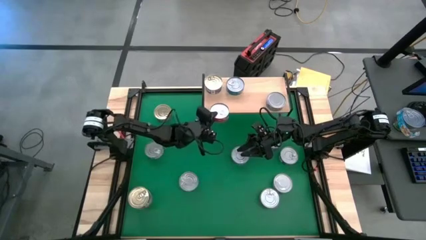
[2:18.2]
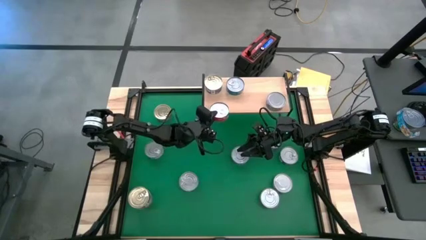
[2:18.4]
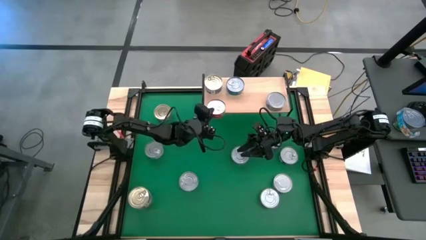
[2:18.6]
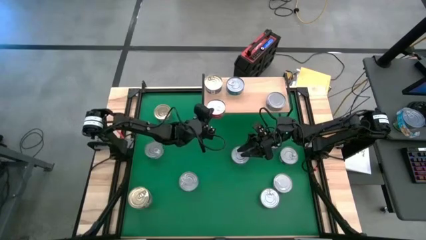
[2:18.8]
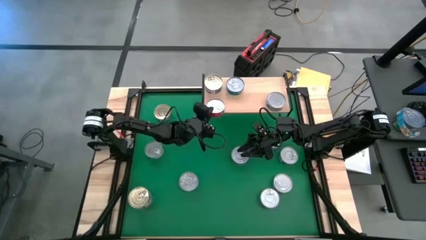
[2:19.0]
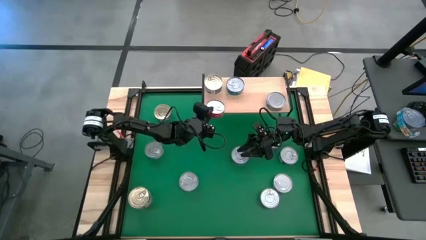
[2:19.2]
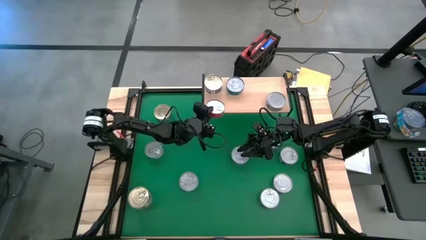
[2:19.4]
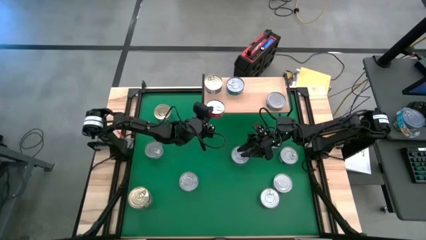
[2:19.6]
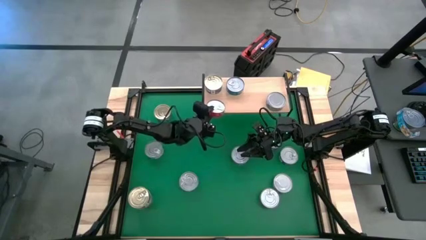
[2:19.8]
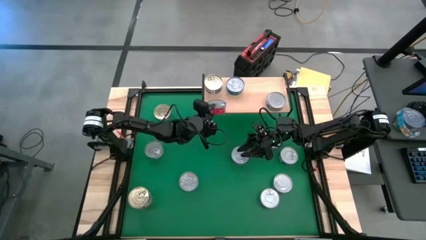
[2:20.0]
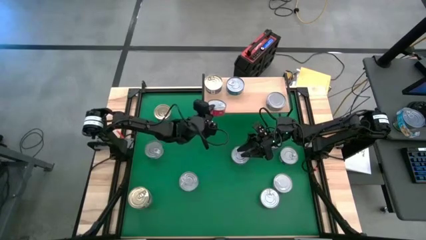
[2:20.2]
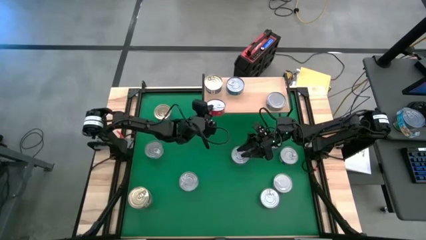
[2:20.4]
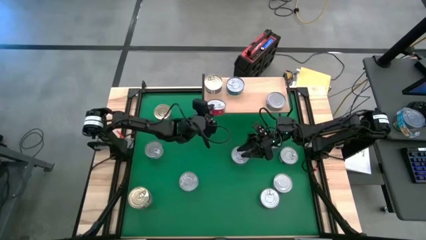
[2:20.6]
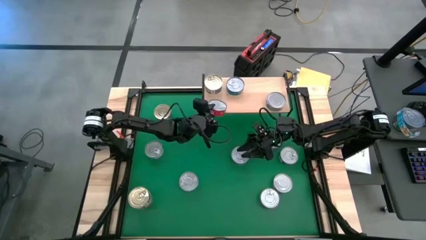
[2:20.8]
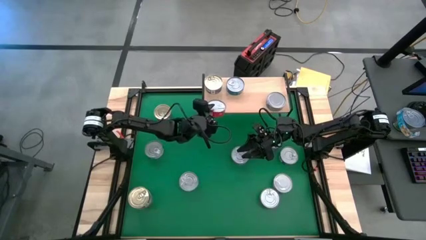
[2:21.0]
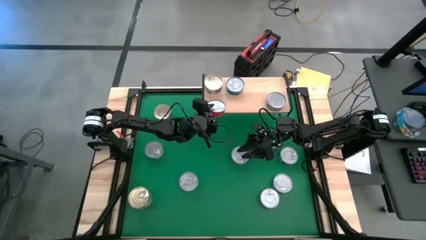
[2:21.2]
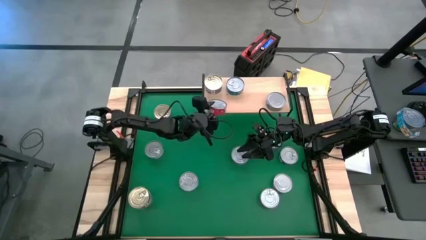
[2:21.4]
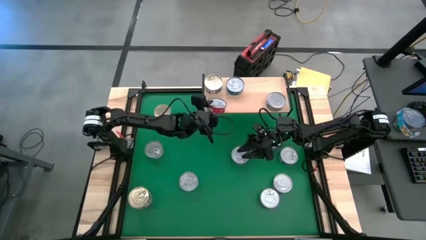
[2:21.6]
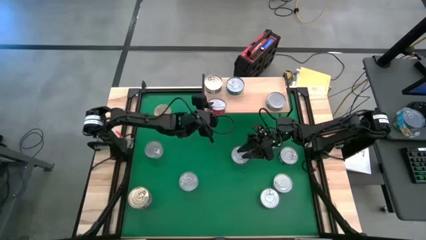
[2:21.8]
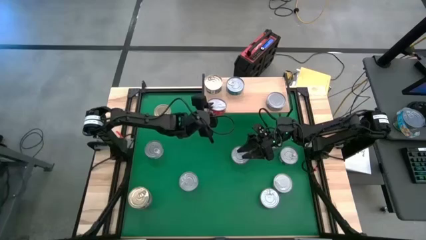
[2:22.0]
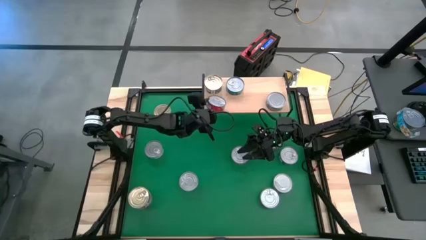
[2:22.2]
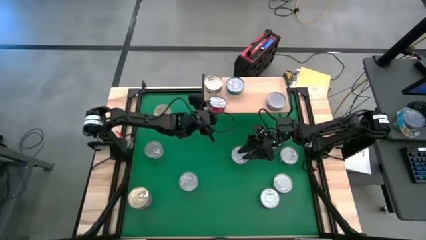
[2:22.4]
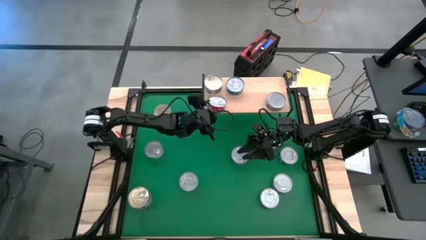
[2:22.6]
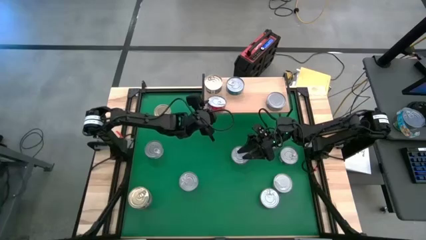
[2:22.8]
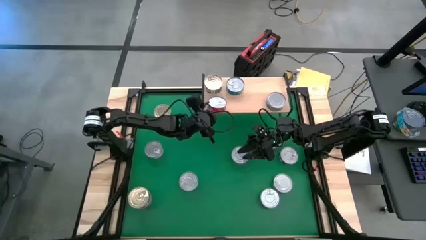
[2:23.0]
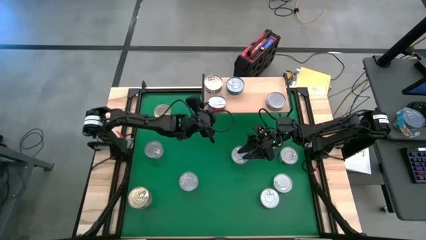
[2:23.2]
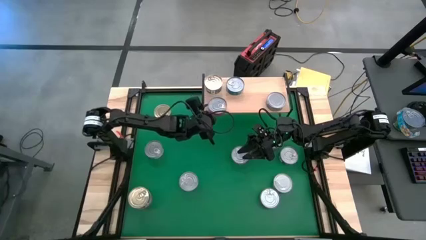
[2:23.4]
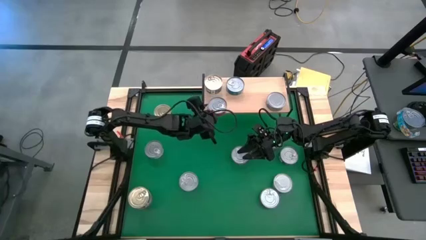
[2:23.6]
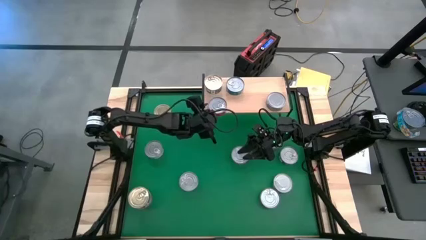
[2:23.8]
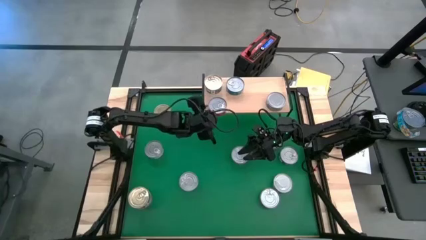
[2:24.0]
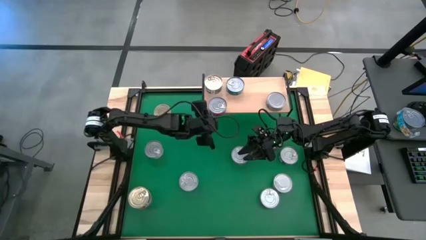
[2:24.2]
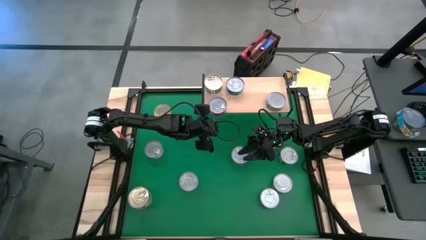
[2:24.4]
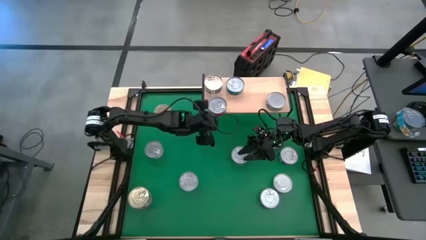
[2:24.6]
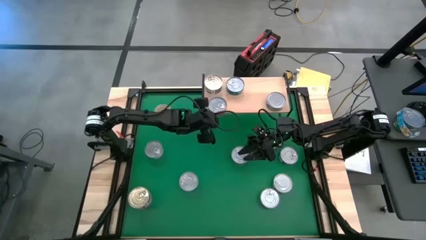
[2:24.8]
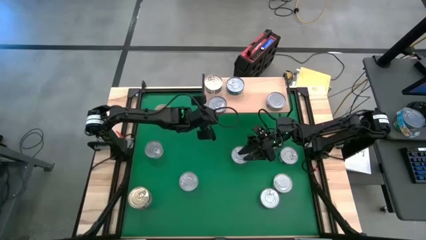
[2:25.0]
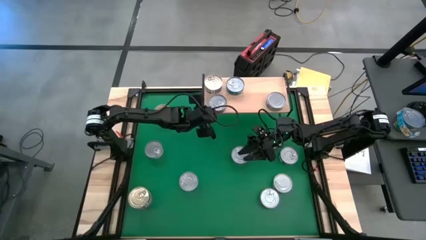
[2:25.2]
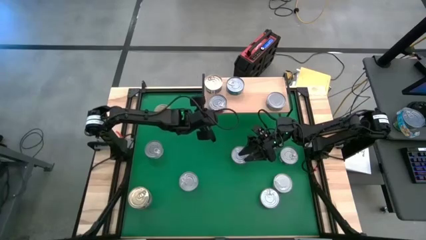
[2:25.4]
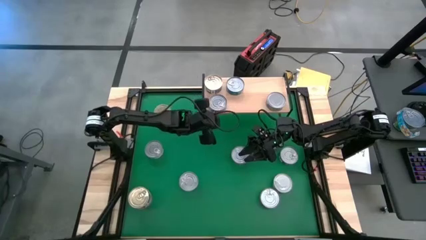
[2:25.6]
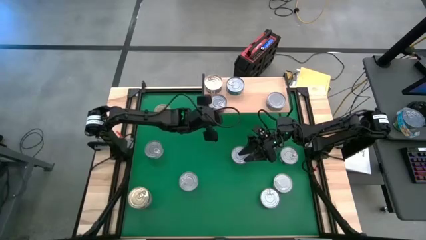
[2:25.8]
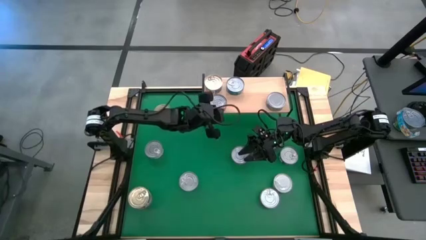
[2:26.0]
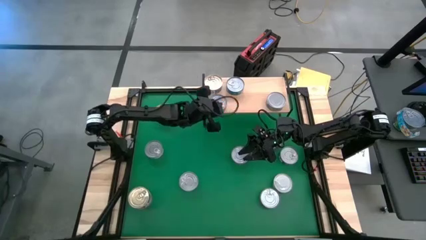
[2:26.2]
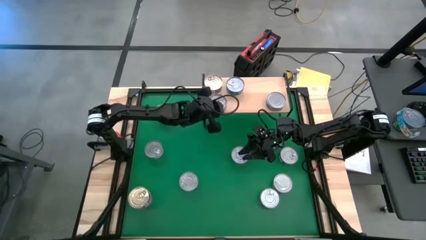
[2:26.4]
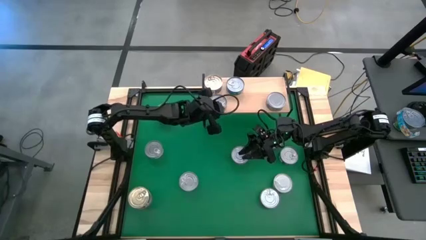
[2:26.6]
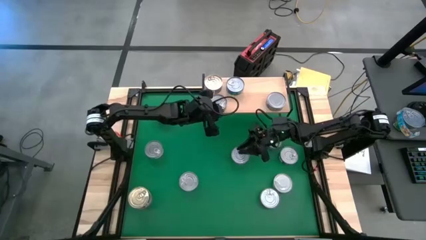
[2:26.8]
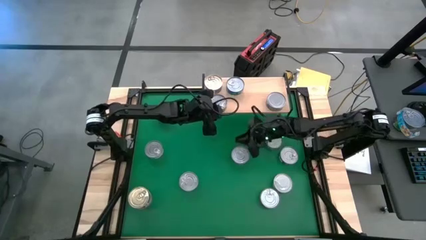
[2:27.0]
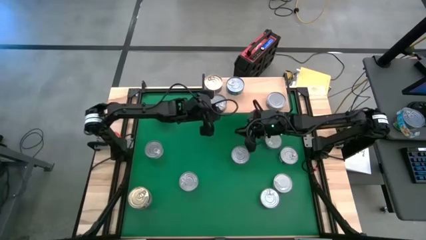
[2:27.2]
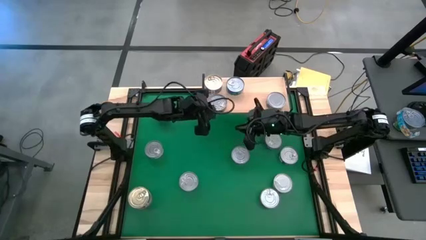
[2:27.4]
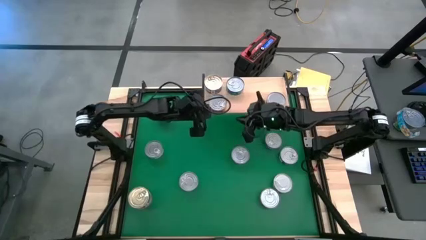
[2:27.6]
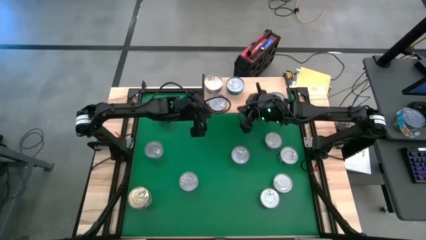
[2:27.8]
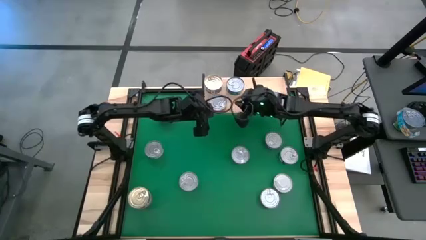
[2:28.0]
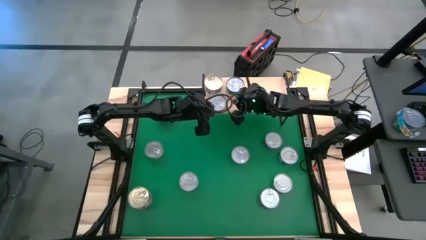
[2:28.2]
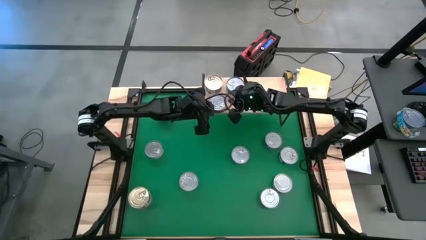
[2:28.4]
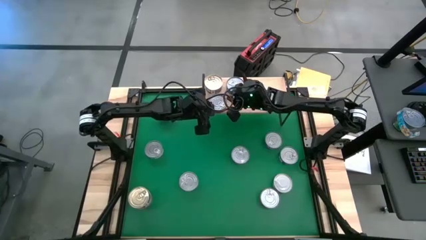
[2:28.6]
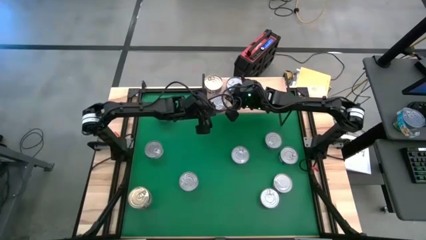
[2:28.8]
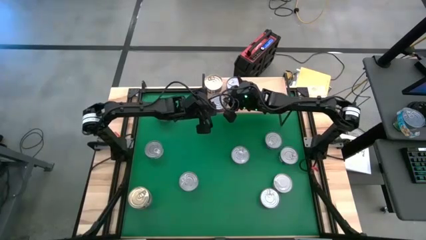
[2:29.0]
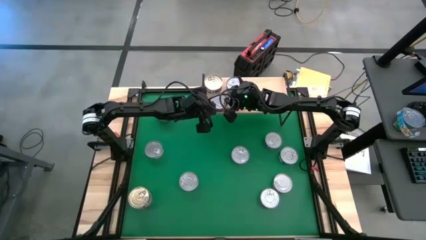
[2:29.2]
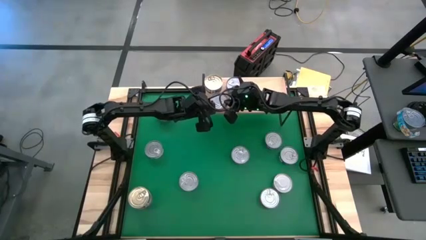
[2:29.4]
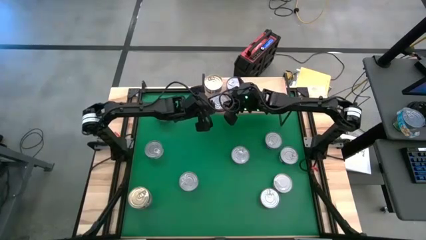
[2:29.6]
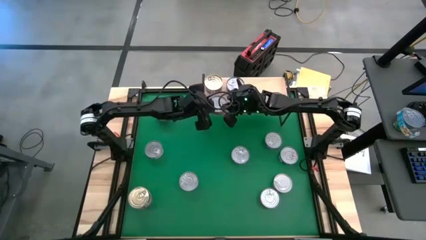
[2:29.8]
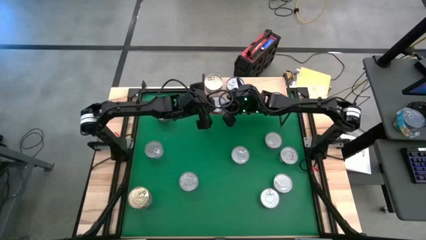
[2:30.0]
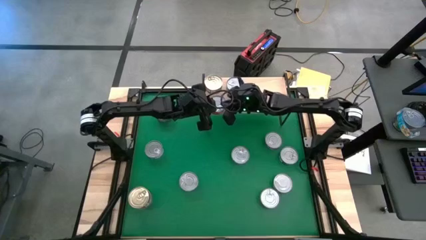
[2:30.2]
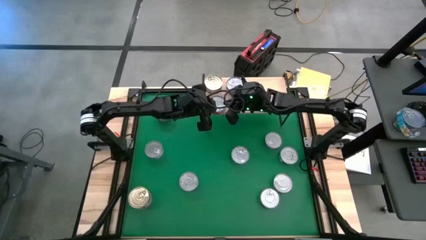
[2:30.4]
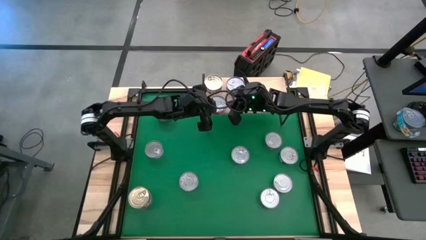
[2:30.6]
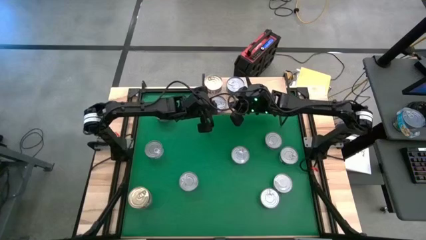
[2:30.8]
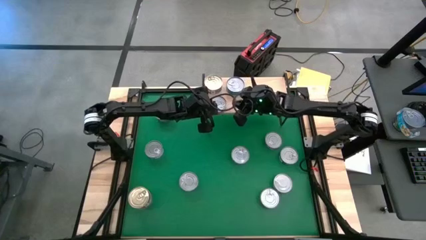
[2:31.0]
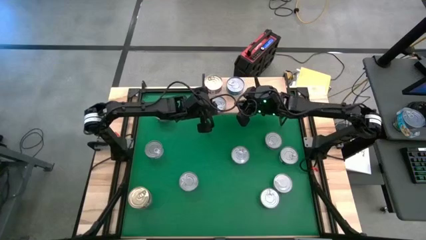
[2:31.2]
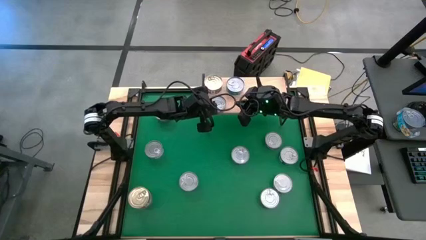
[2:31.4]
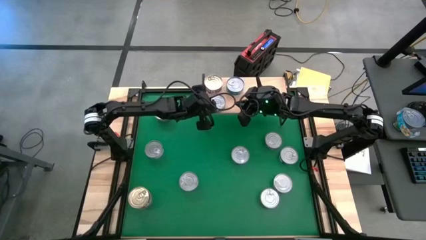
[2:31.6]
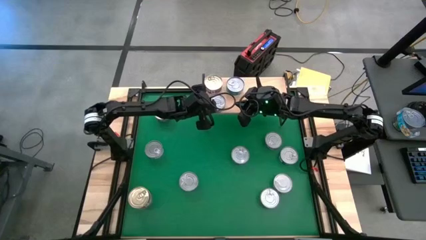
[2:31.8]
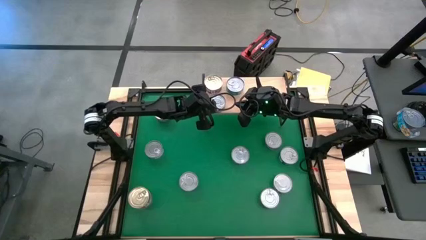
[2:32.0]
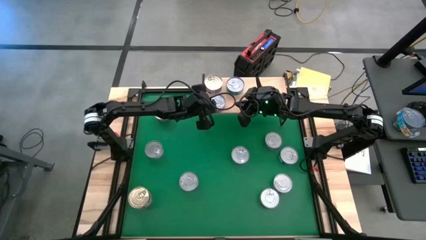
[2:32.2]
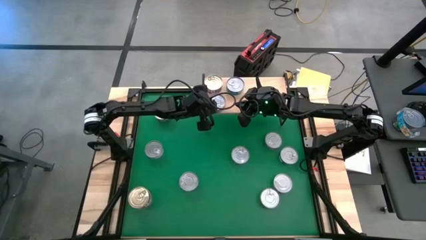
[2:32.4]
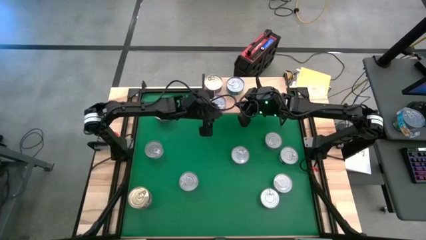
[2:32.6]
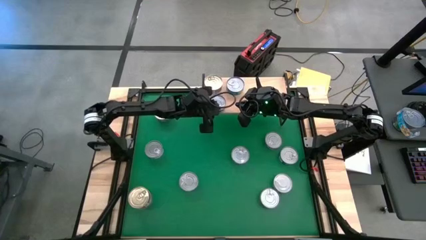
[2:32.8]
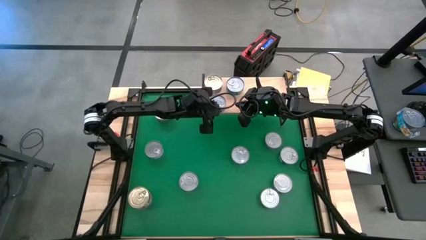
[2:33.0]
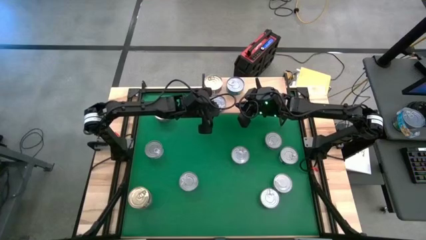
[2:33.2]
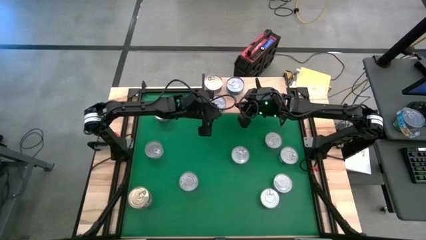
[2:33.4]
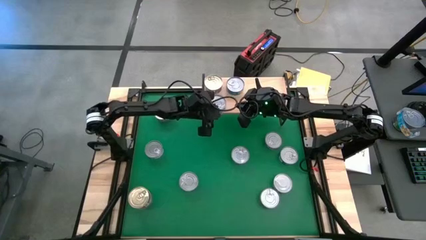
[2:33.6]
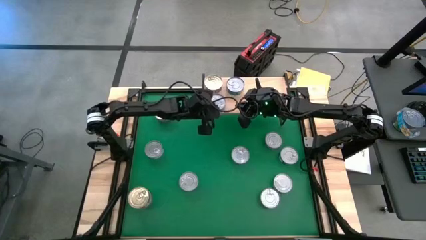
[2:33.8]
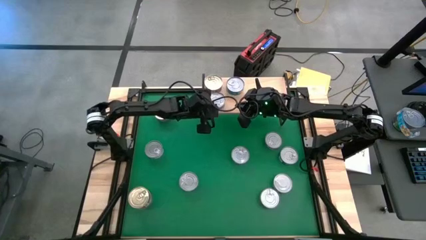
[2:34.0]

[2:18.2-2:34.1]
Task: Stack canned seafood by type on shelf
Put the red tuna can on the shelf
